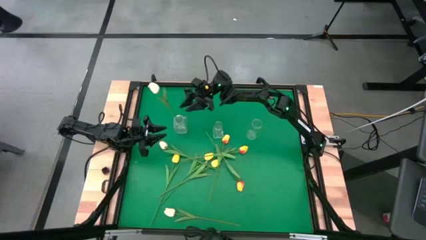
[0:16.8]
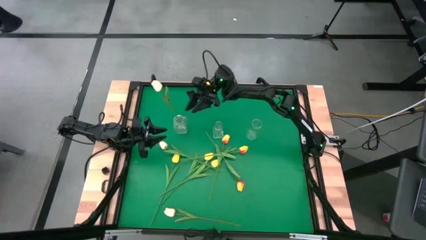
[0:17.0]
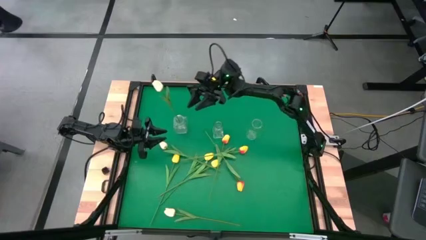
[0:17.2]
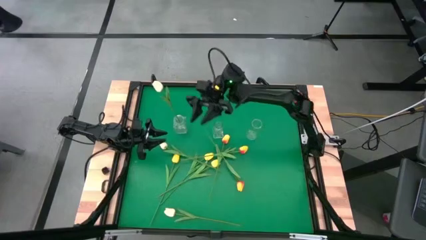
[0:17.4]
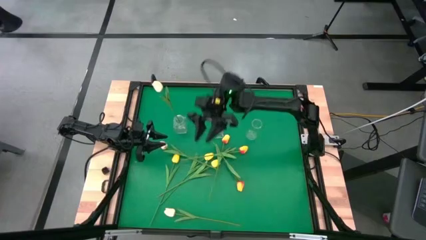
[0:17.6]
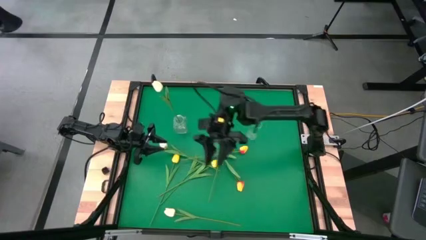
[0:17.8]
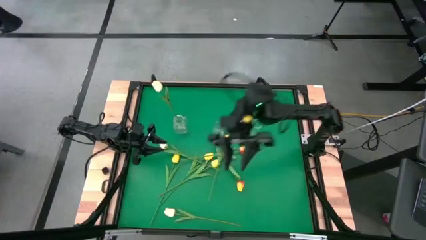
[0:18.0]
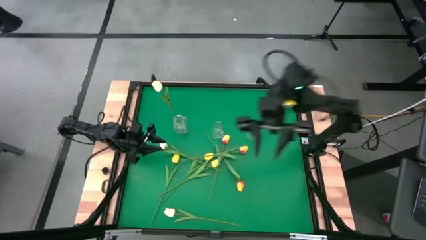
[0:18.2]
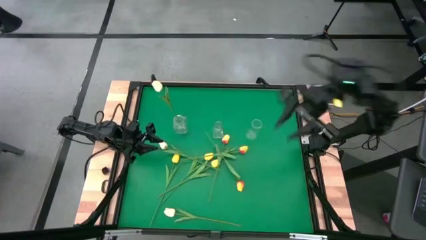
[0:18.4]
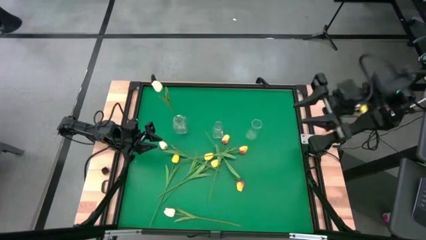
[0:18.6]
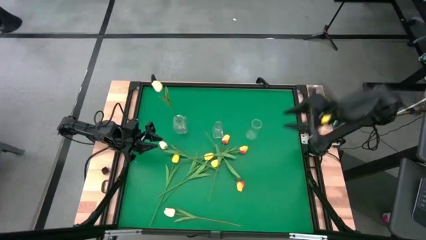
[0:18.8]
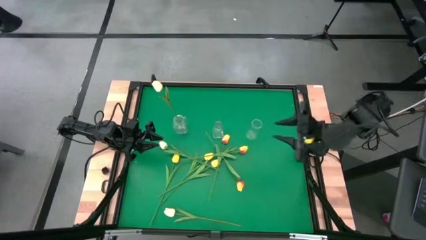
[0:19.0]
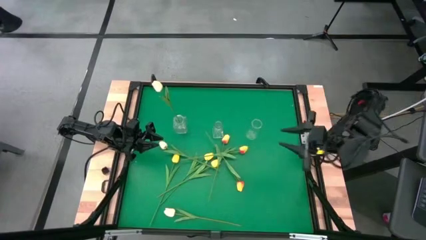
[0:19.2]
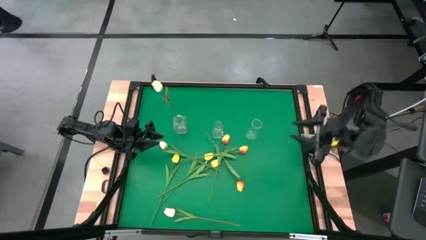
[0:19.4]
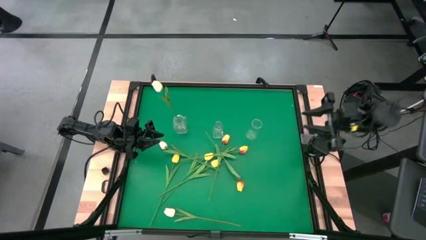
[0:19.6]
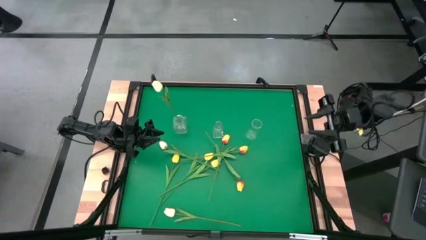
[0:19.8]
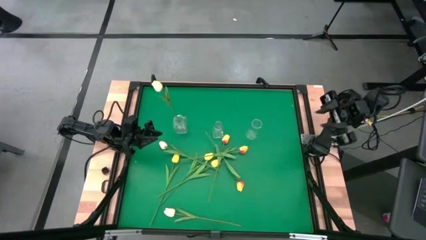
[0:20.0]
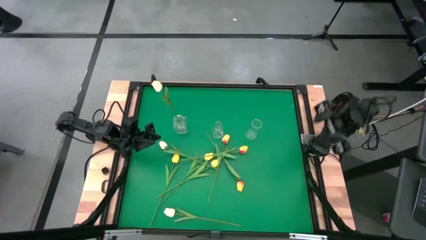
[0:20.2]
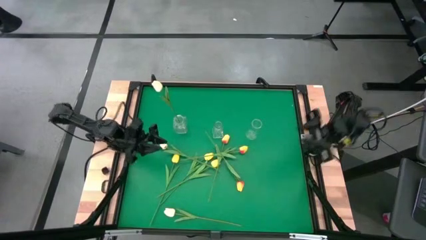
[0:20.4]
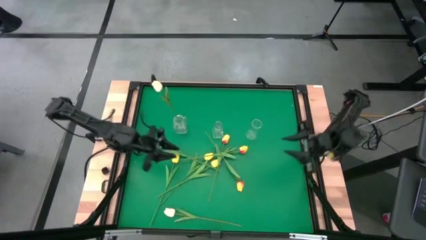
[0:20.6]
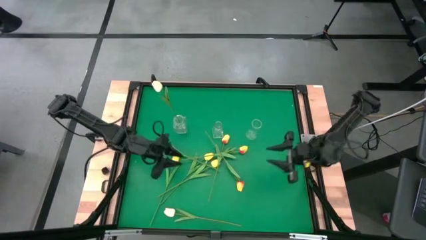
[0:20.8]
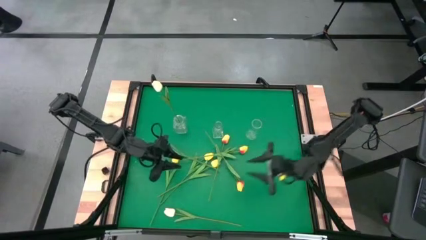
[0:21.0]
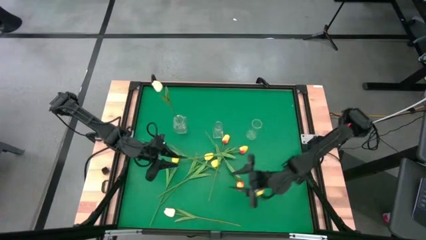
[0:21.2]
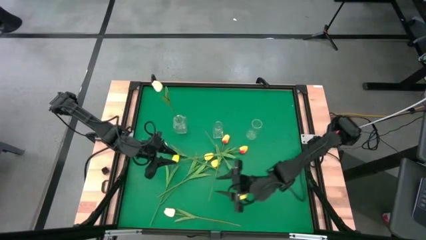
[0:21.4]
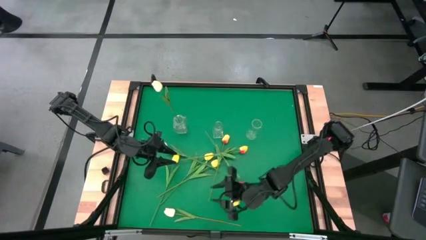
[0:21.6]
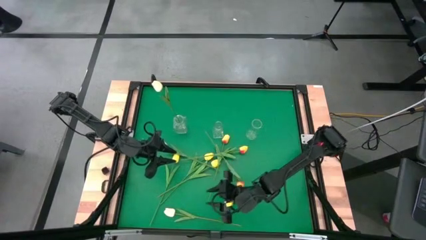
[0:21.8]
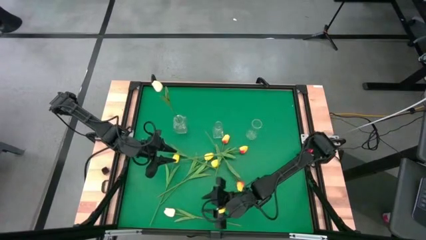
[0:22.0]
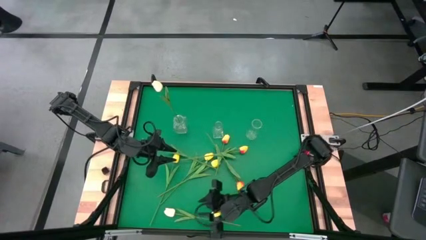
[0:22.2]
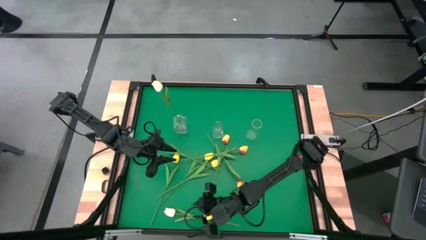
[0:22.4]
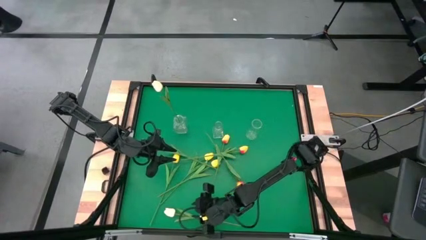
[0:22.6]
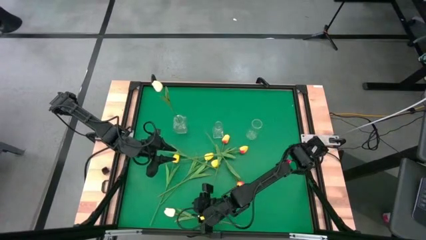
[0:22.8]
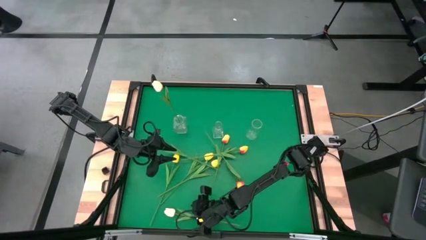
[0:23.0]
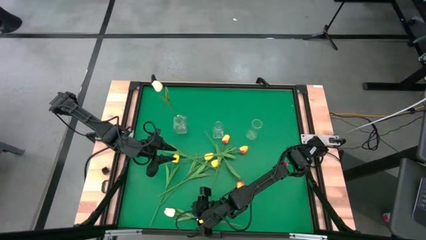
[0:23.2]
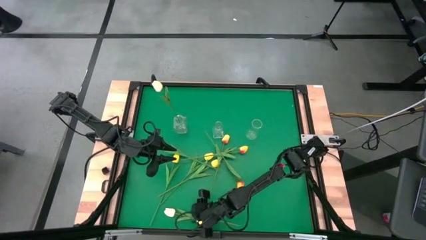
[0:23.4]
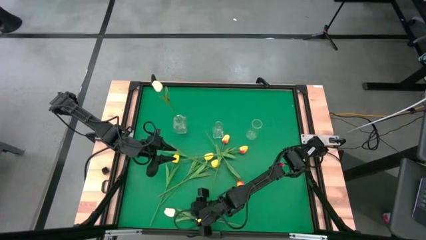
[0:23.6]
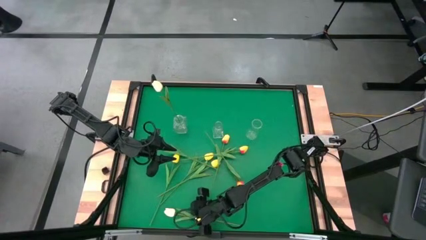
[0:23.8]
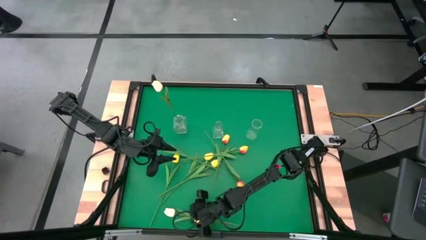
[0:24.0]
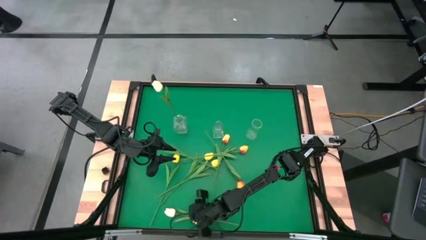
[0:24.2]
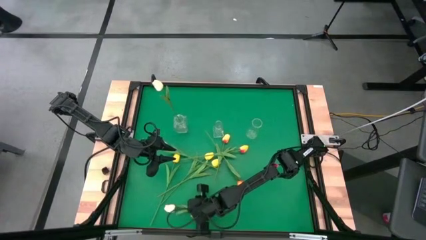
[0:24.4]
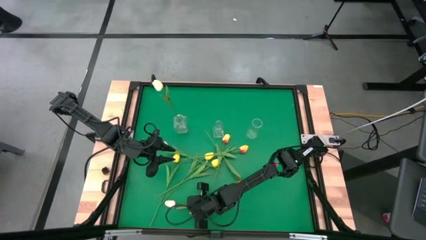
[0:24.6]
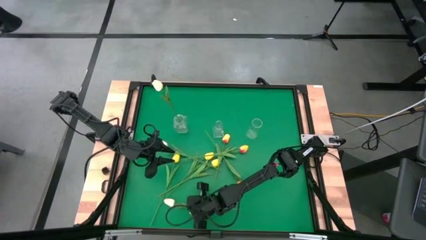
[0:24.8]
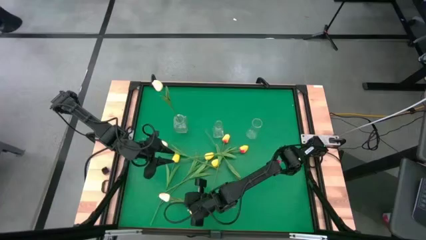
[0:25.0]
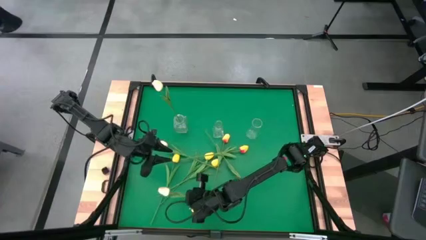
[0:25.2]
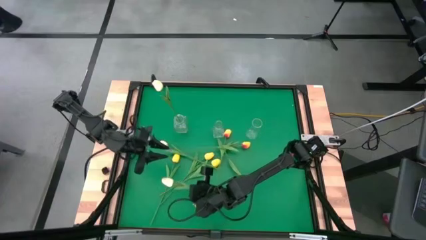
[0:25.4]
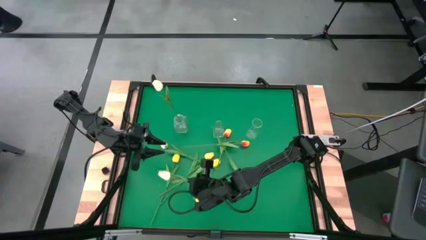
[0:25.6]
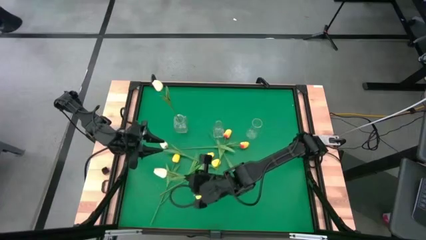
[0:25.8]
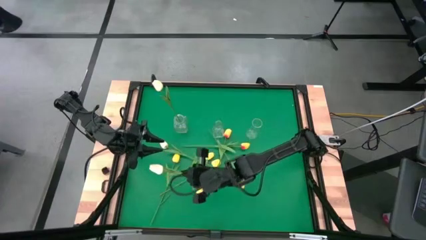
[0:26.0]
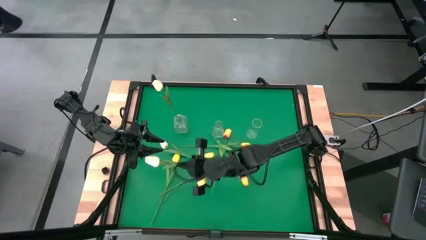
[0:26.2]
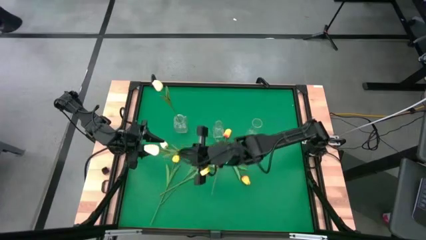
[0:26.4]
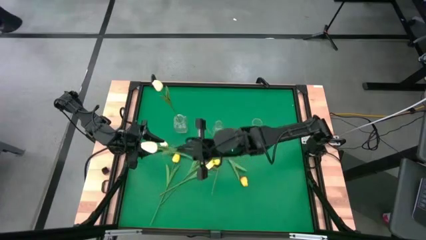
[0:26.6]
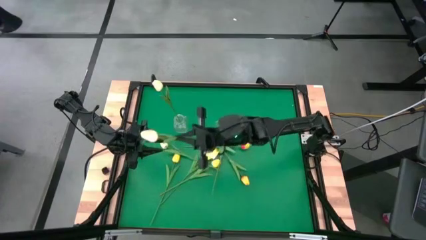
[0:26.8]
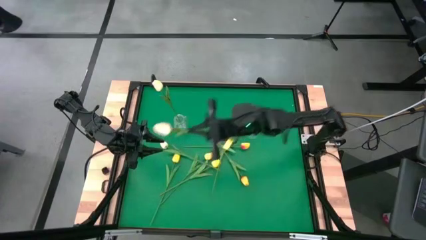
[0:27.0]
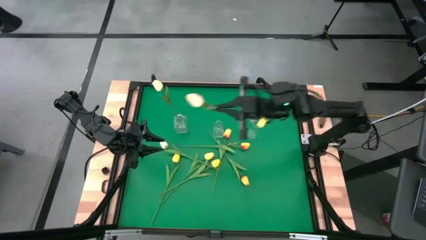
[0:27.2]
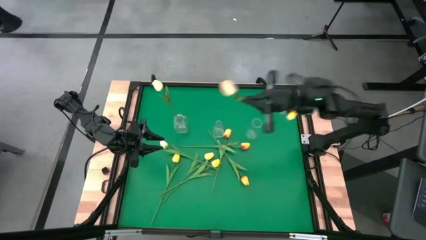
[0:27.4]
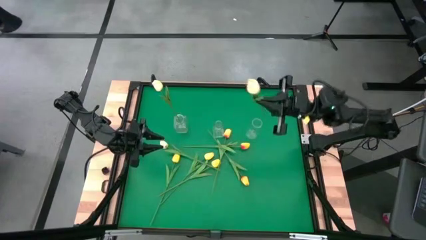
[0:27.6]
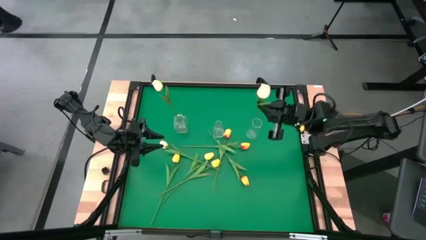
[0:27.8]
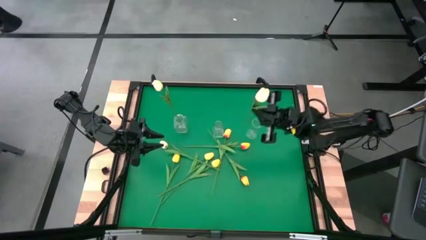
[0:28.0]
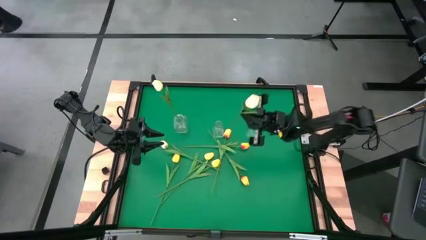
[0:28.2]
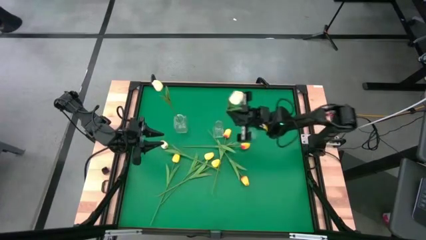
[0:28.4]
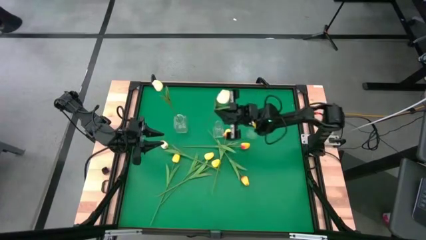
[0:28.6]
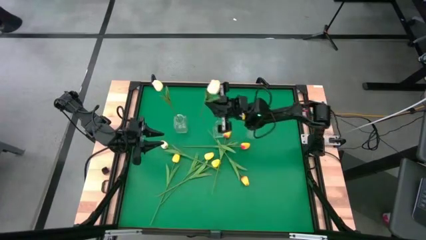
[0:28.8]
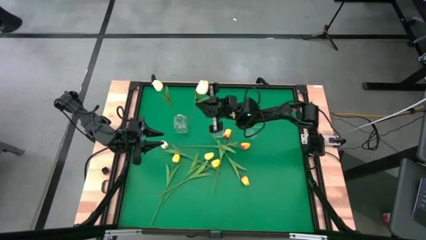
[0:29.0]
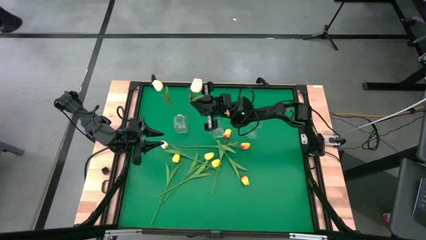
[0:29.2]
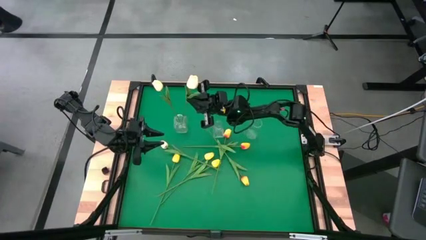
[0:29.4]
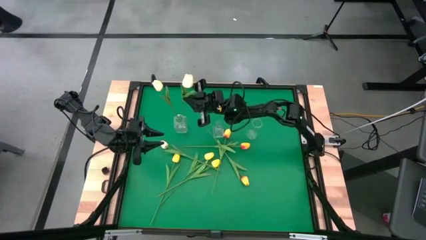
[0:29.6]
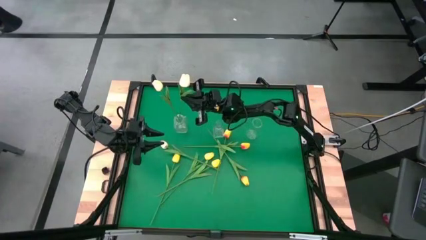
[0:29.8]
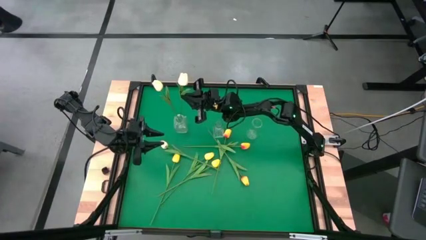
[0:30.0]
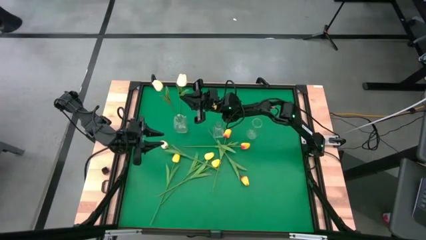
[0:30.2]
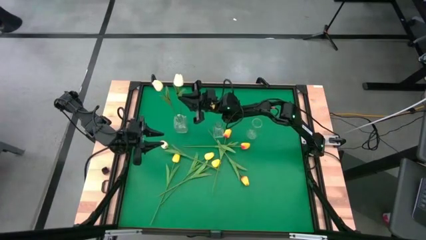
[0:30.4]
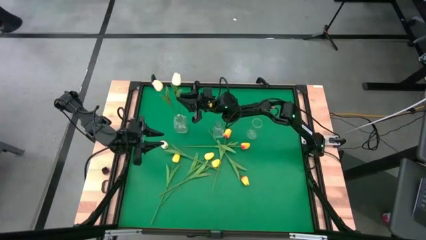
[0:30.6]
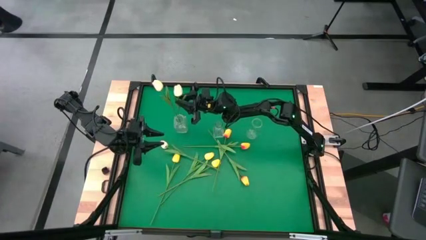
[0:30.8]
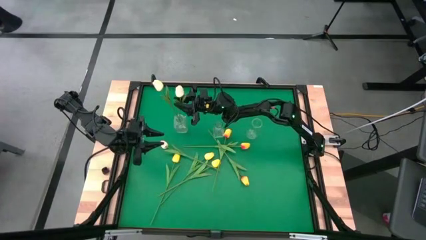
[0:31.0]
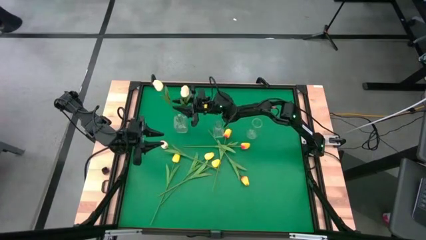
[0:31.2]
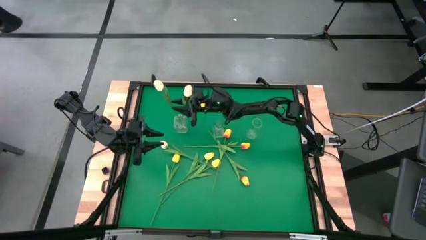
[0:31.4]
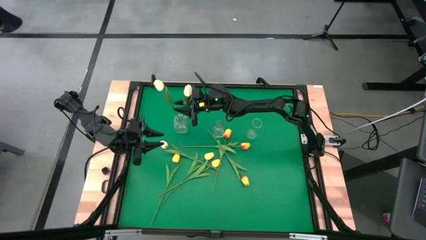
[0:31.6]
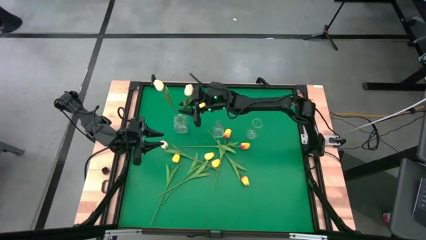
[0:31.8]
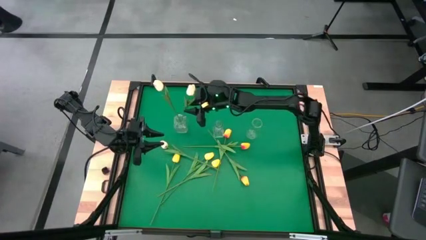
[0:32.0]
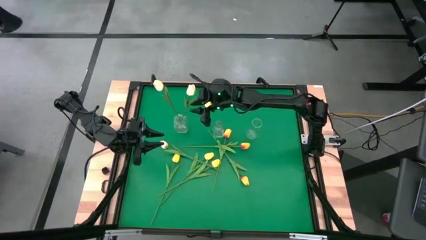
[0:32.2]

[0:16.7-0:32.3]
Task: Sort flowers into vase by color
Put the bottom white flower into the left transparent vase
